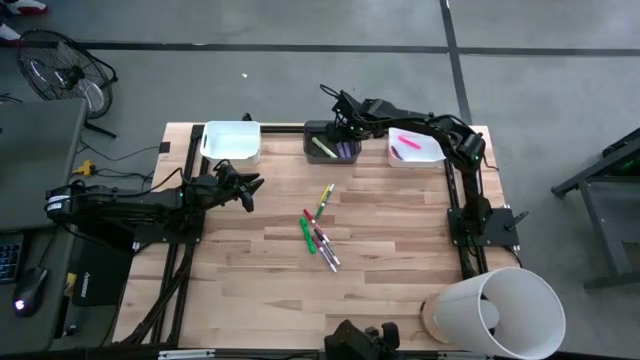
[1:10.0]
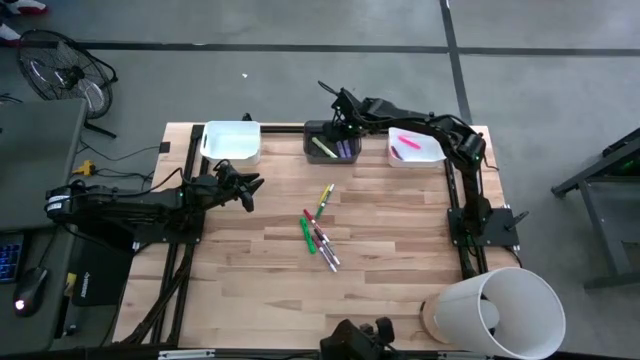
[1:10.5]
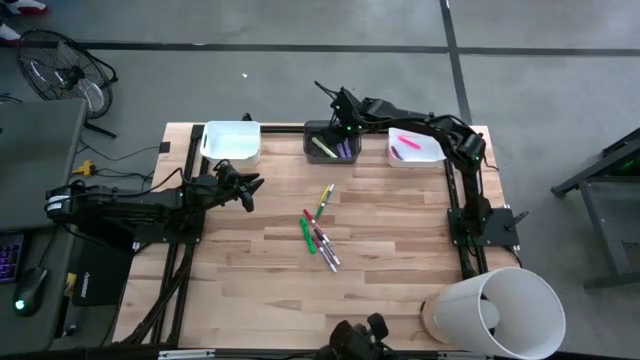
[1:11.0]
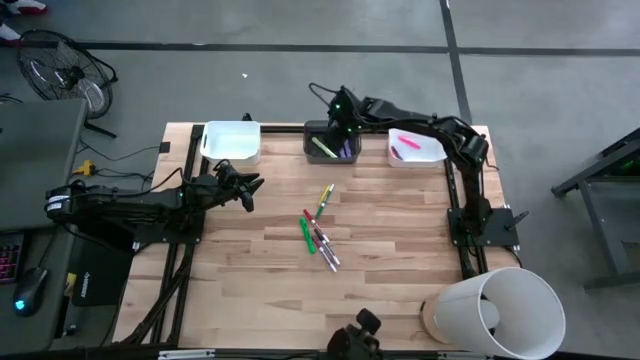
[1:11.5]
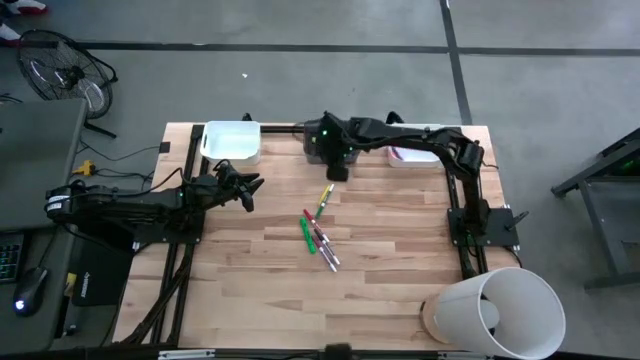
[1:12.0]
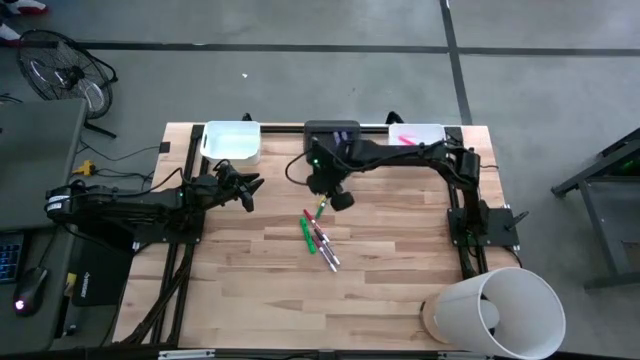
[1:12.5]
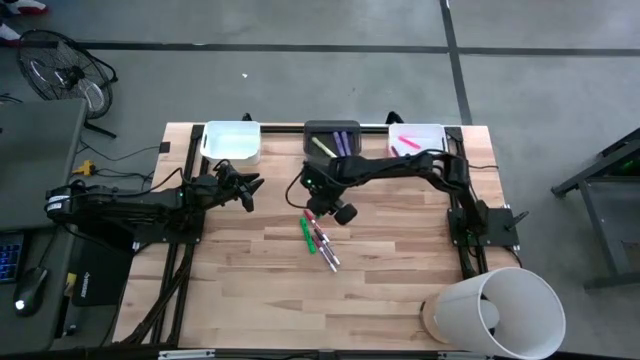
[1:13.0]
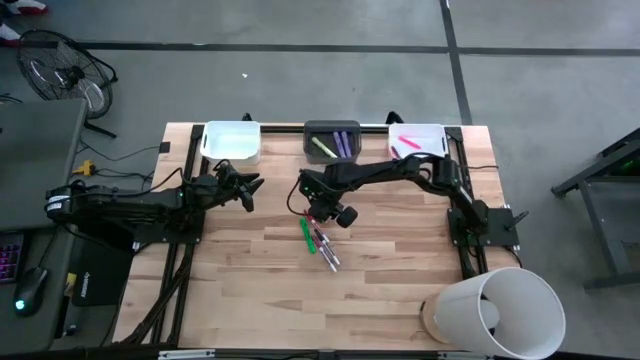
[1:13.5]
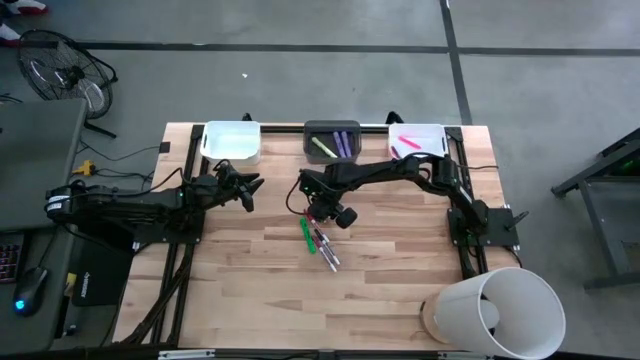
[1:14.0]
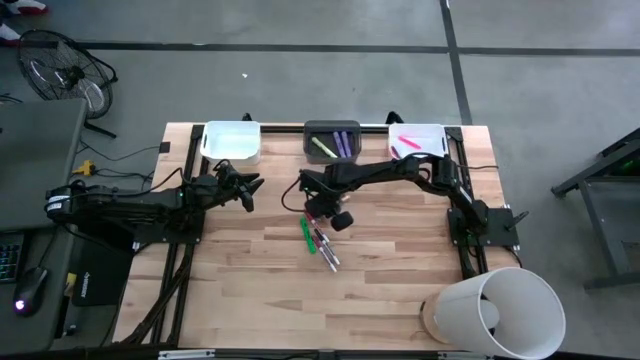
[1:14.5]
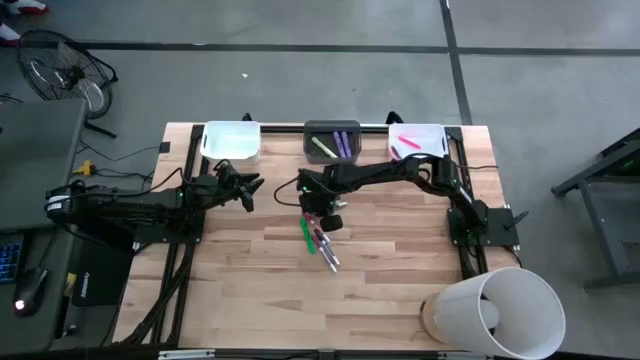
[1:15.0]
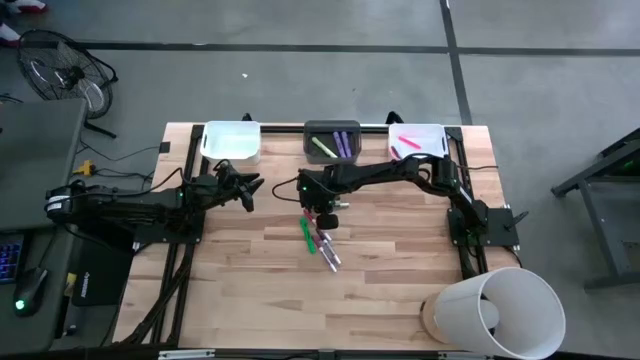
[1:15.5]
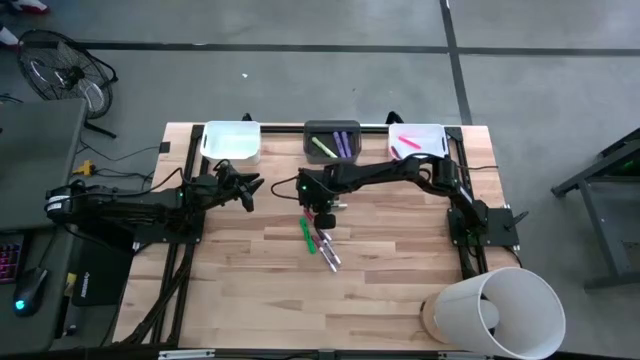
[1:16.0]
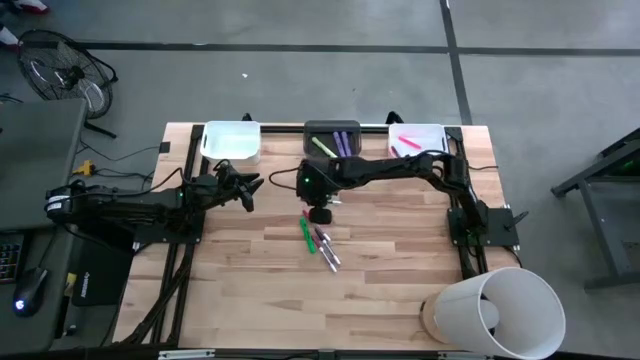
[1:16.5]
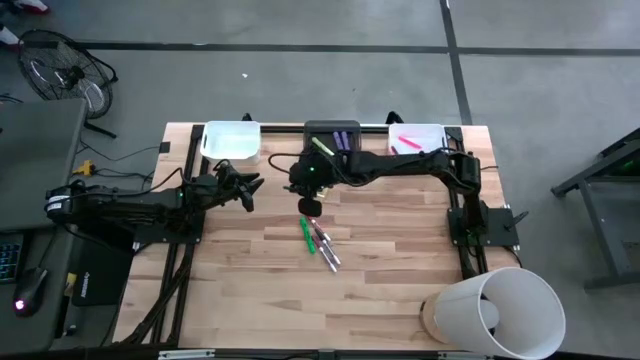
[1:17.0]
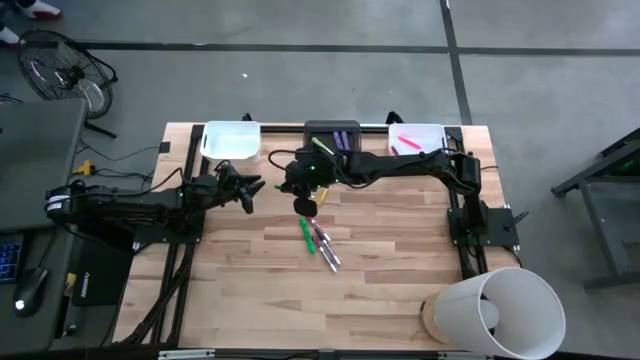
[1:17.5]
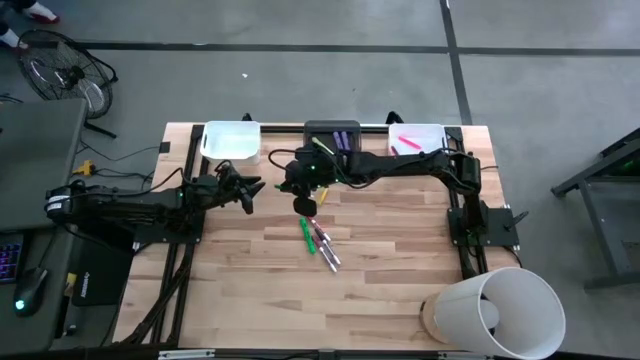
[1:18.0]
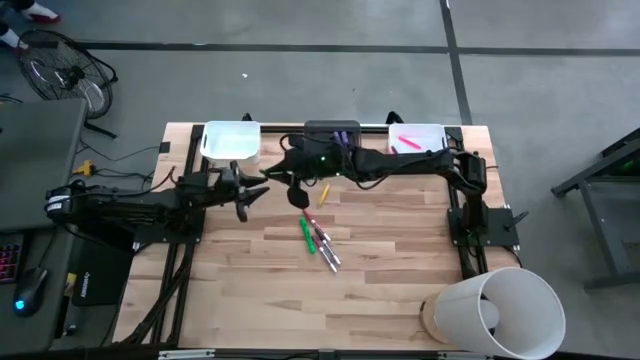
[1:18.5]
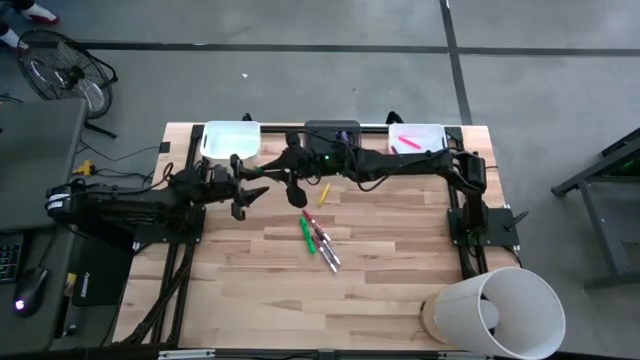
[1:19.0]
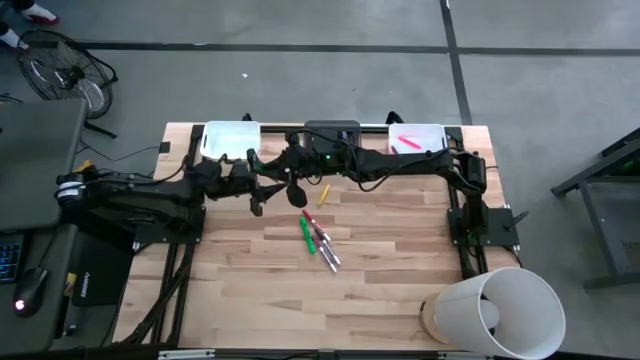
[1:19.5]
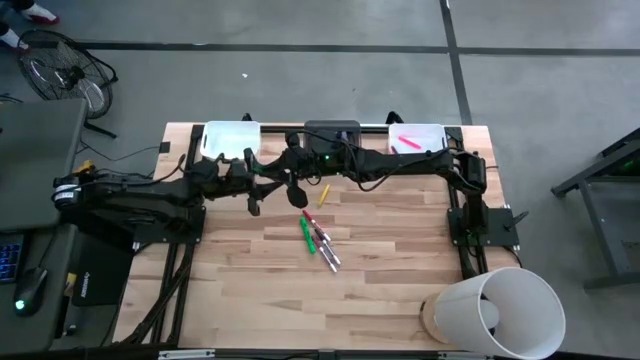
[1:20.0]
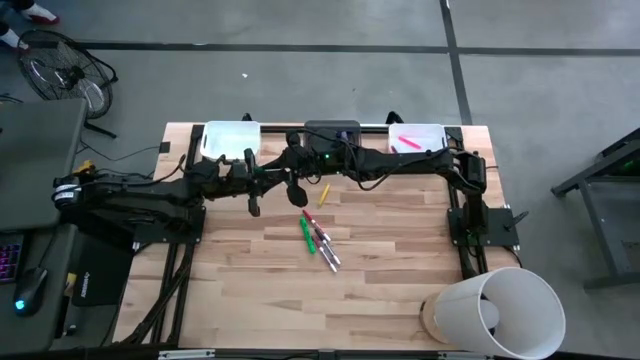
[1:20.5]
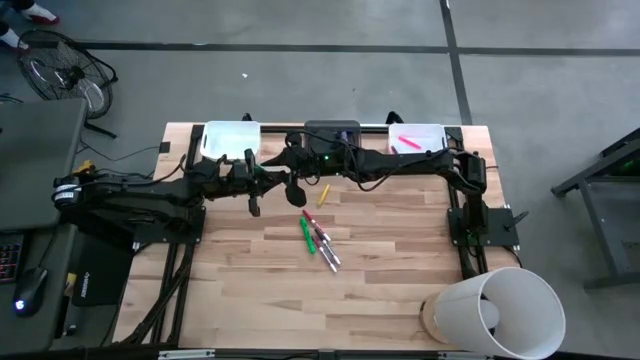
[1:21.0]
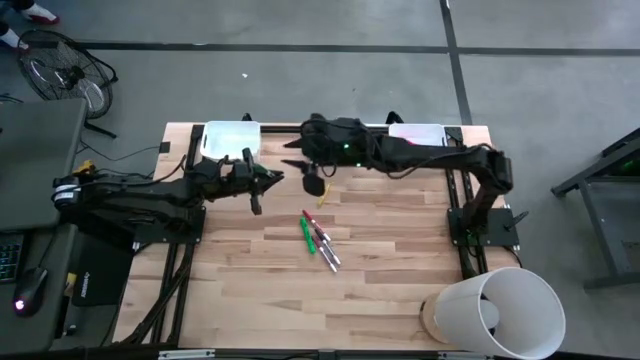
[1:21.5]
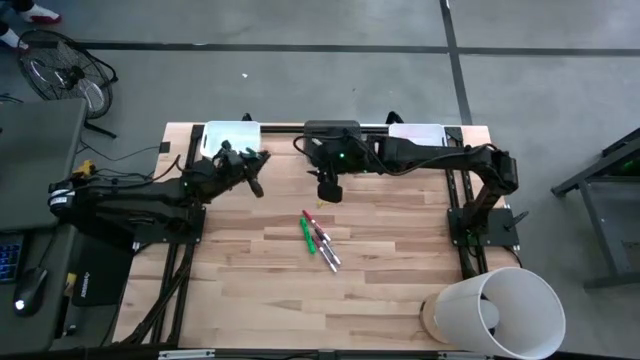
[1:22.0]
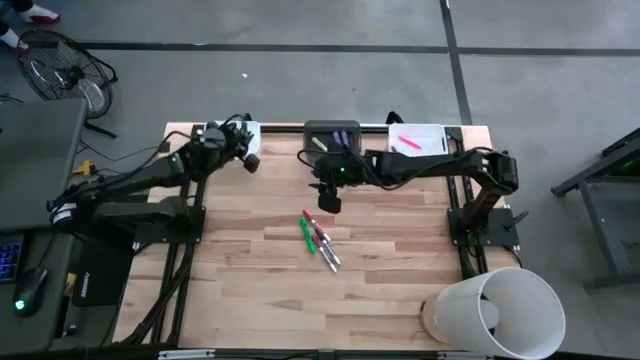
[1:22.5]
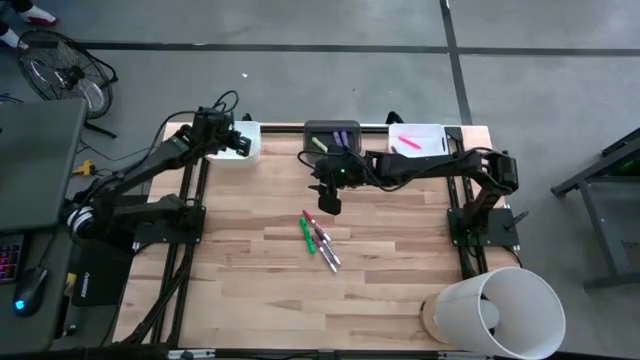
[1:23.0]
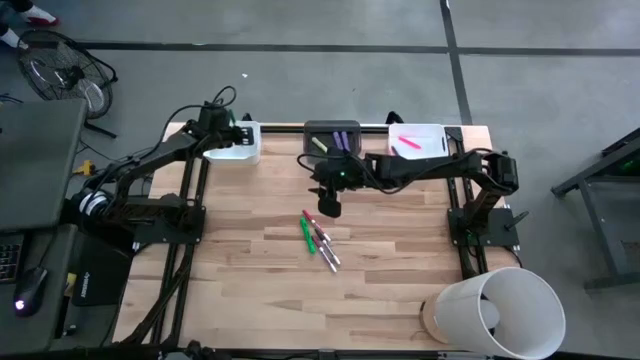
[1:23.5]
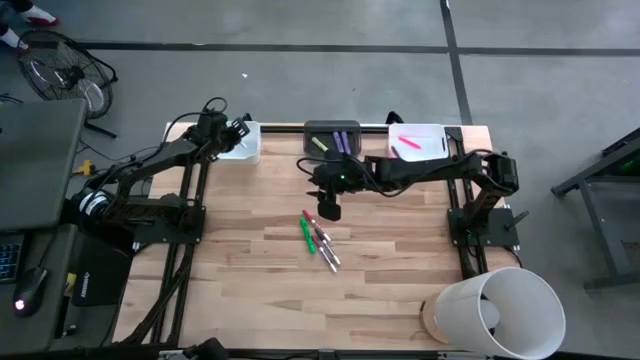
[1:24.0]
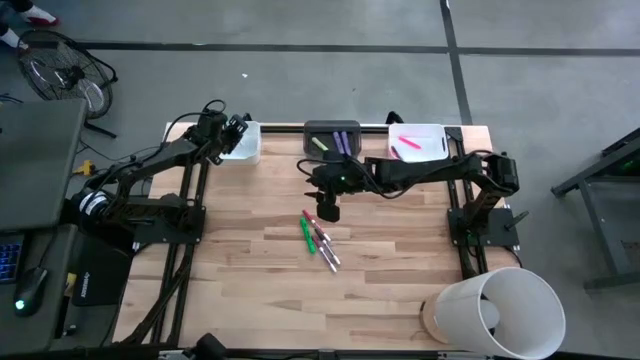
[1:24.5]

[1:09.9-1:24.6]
Task: Pick & Place Markers
Put the green highlighter pen into the left white bin

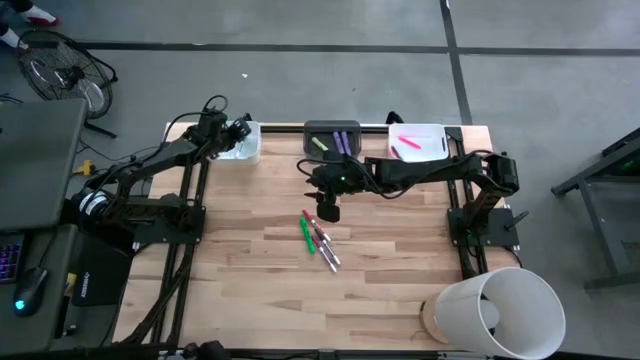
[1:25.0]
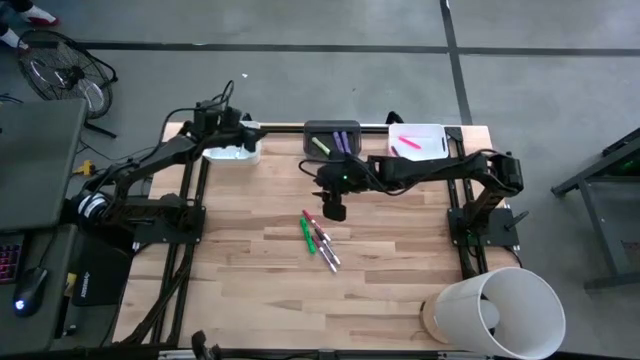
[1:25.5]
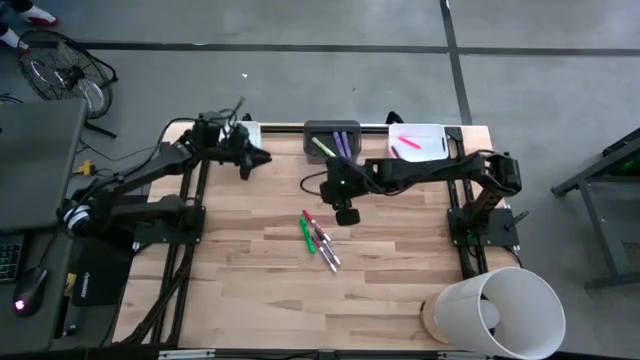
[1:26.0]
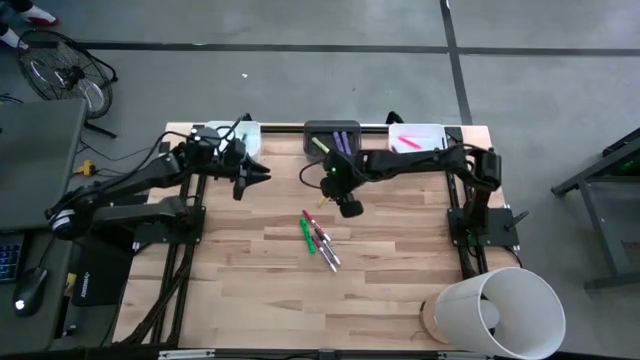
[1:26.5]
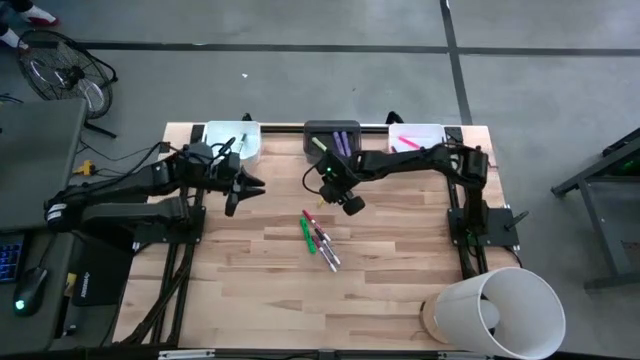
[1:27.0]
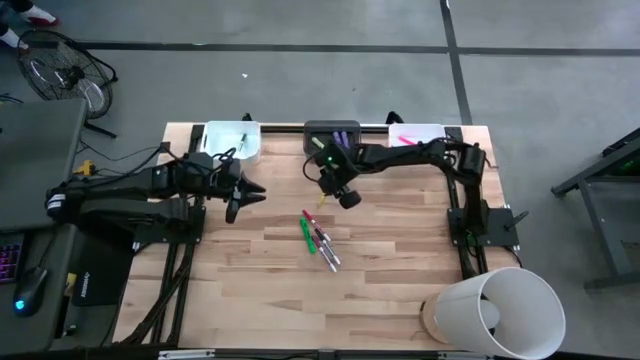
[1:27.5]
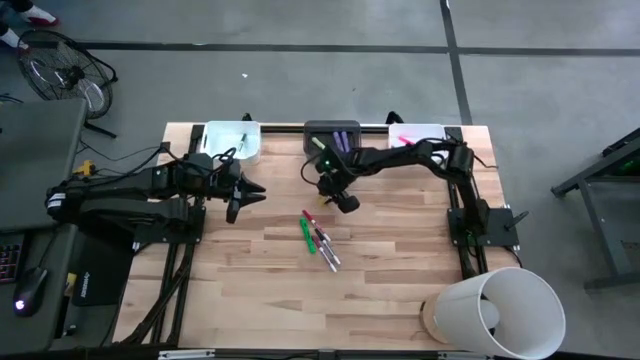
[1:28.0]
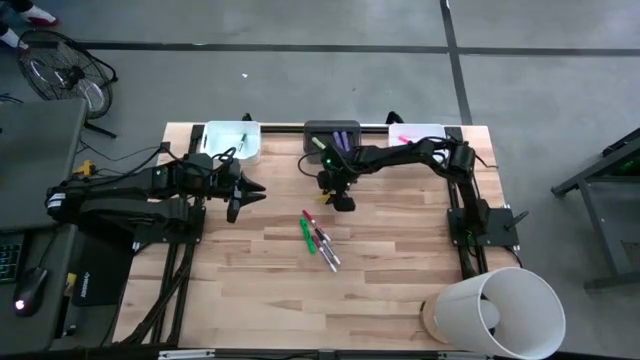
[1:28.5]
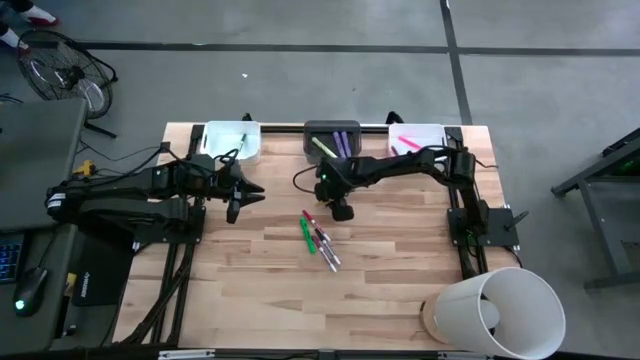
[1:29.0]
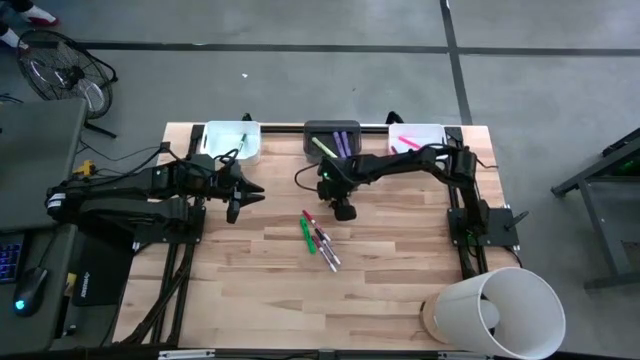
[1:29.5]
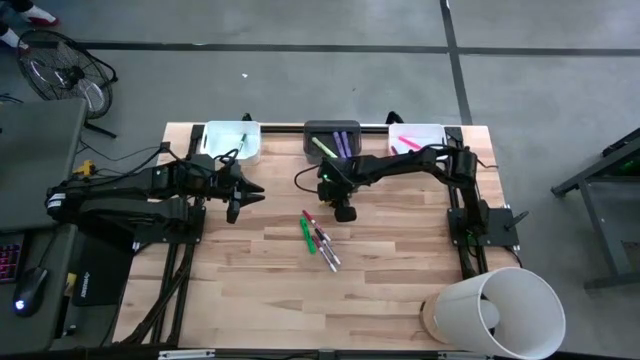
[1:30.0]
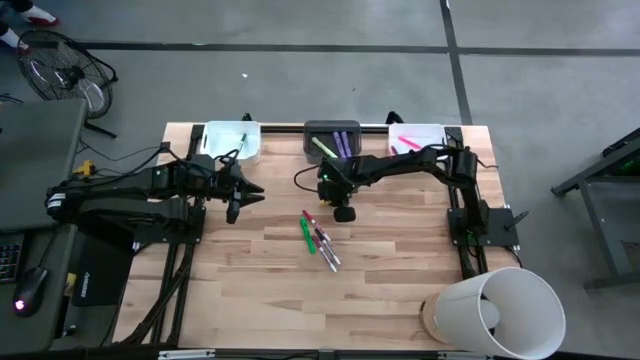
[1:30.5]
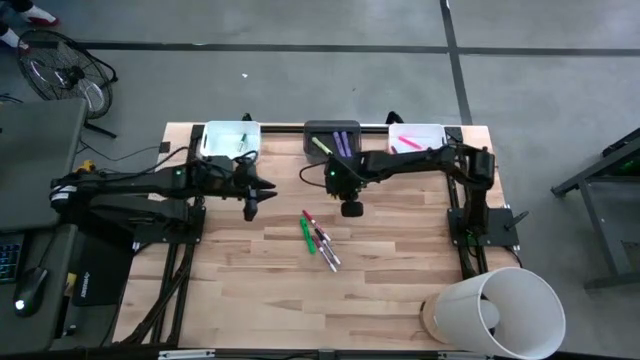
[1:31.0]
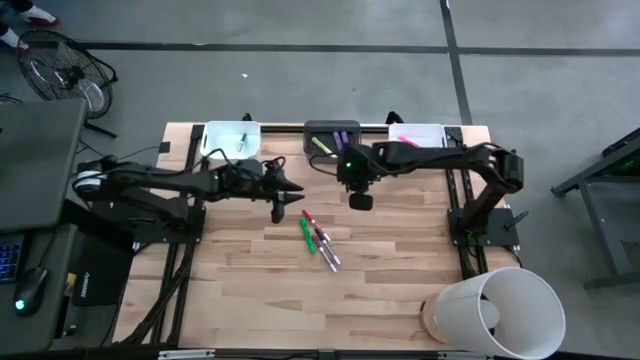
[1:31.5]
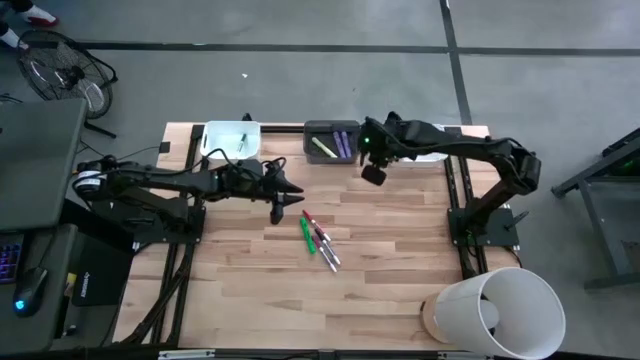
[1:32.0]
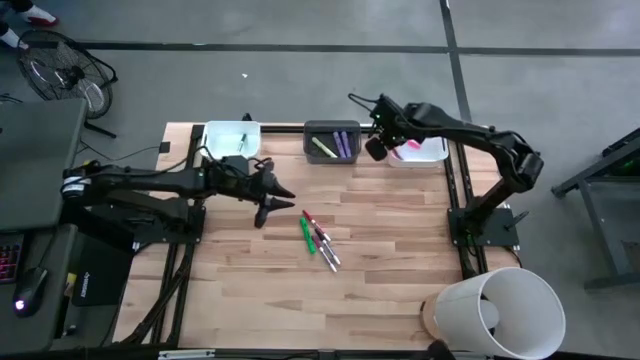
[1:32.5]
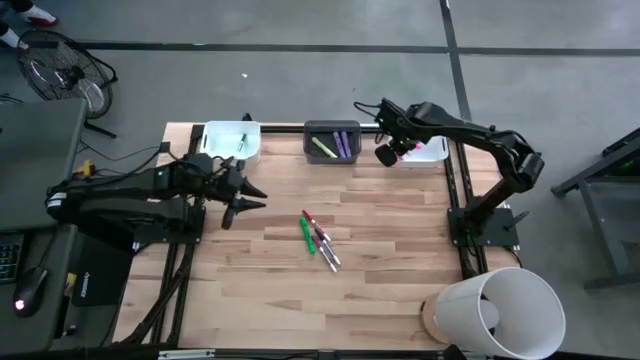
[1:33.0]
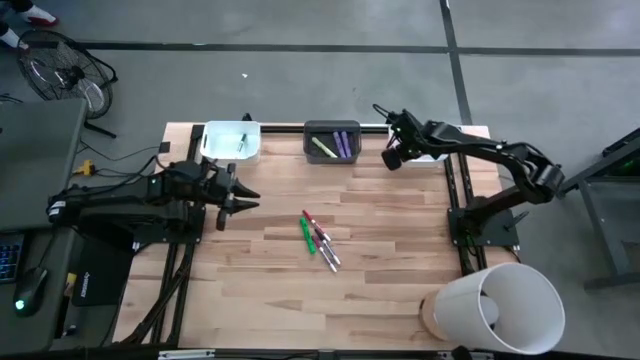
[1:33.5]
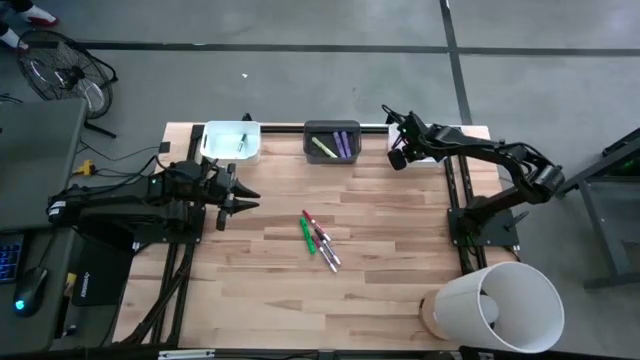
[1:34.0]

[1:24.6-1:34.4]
Put the yellow pen into the right white bin
